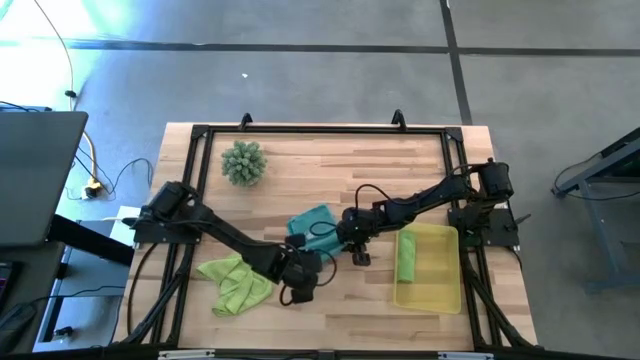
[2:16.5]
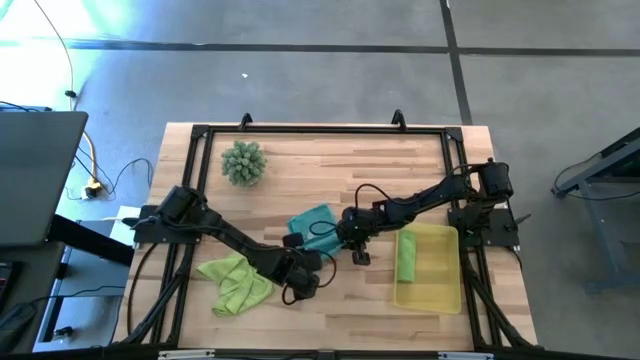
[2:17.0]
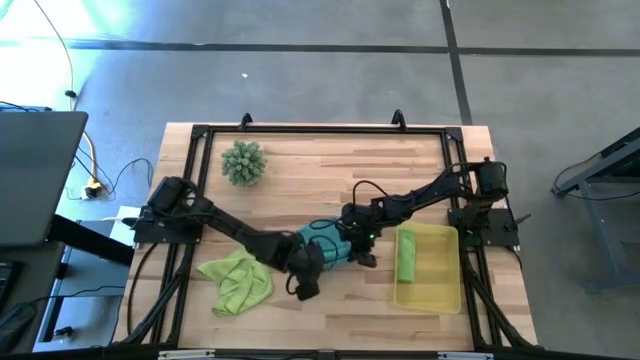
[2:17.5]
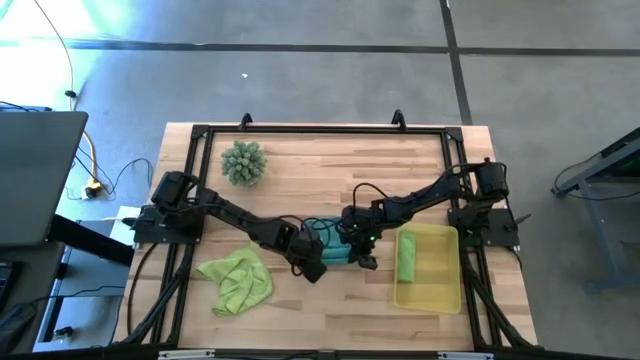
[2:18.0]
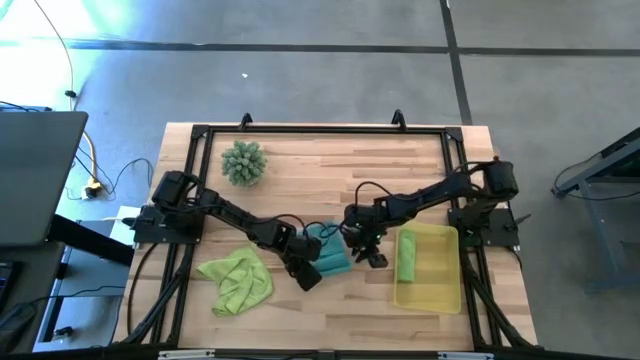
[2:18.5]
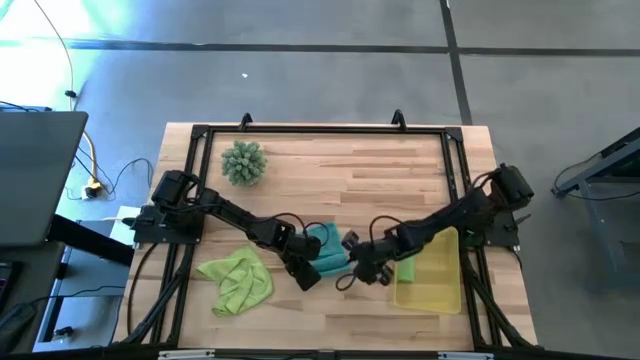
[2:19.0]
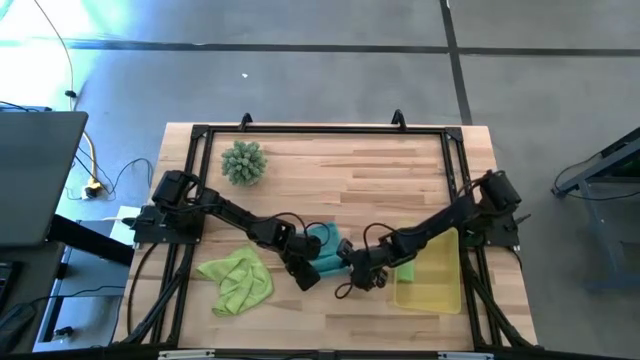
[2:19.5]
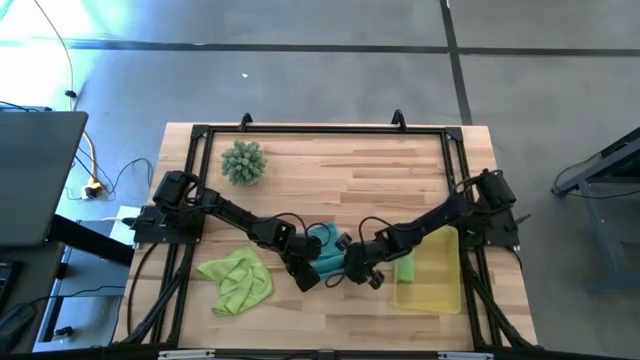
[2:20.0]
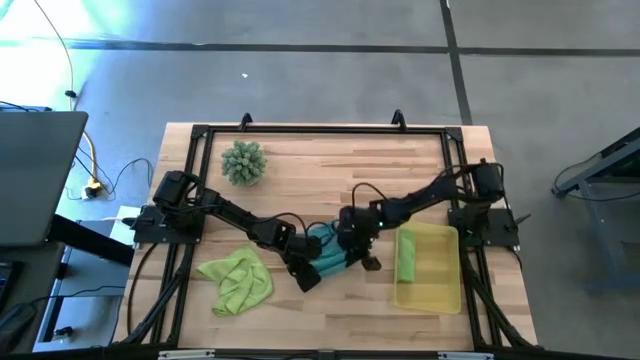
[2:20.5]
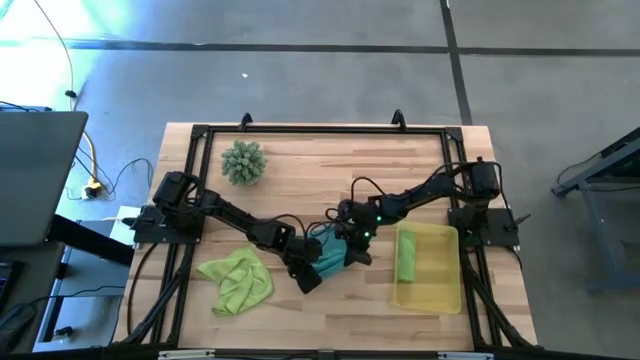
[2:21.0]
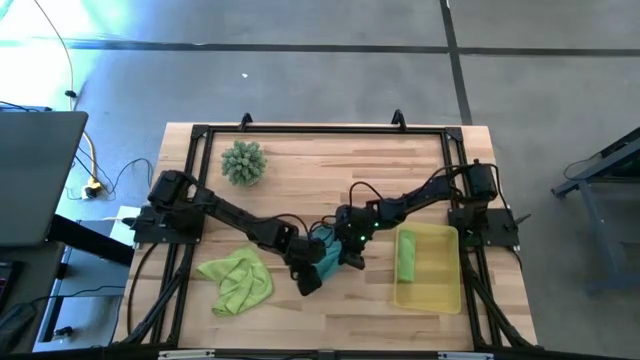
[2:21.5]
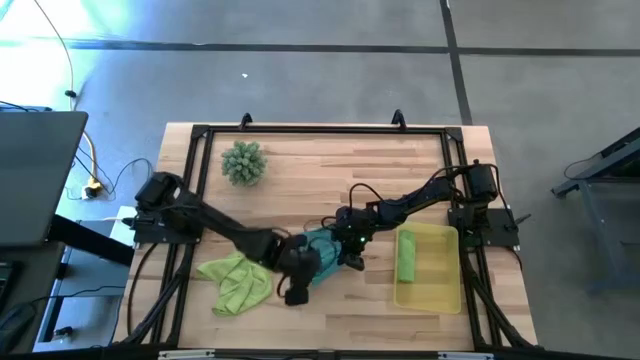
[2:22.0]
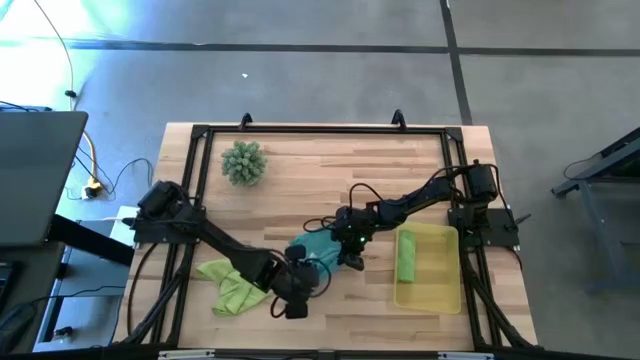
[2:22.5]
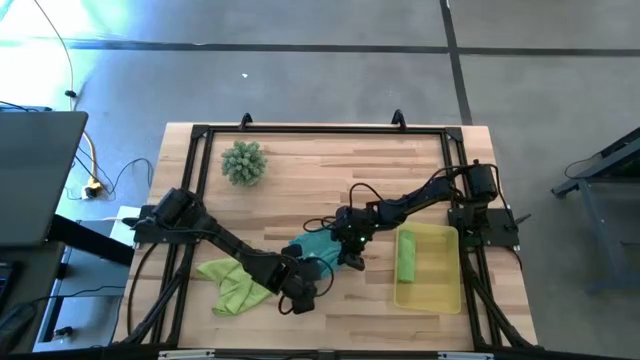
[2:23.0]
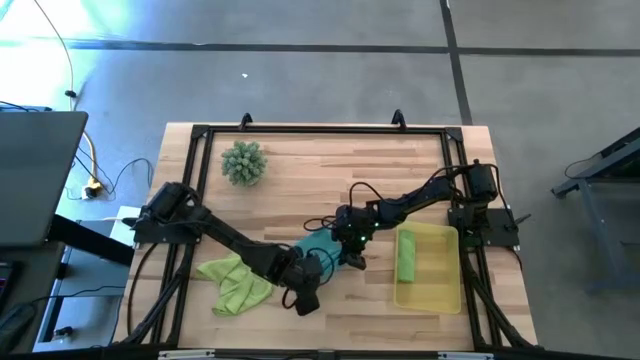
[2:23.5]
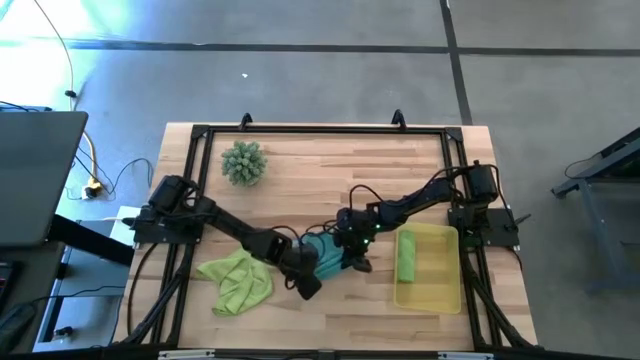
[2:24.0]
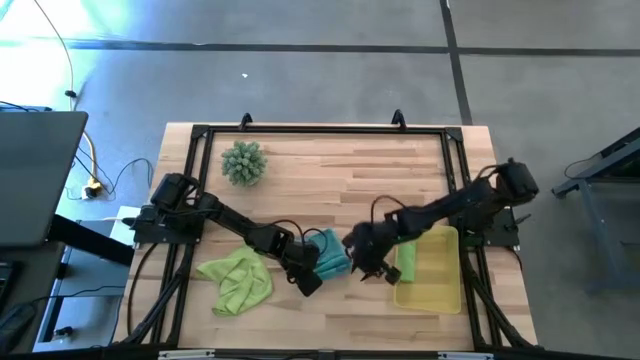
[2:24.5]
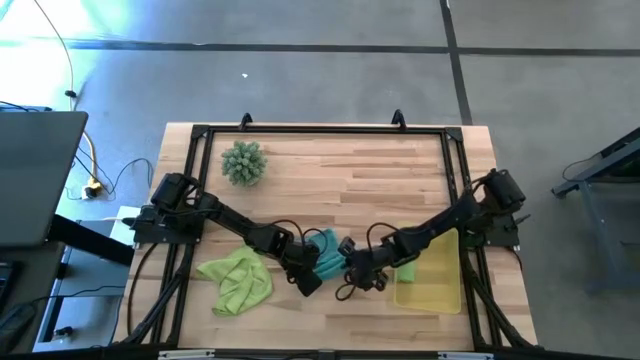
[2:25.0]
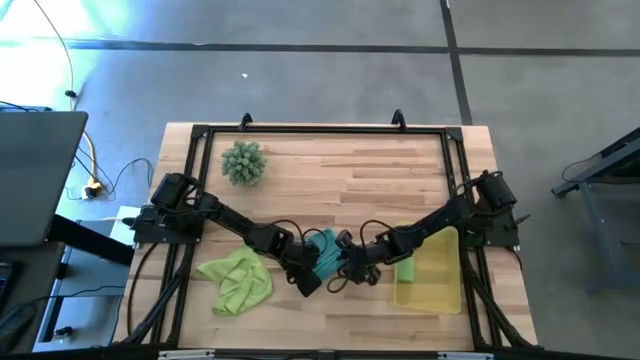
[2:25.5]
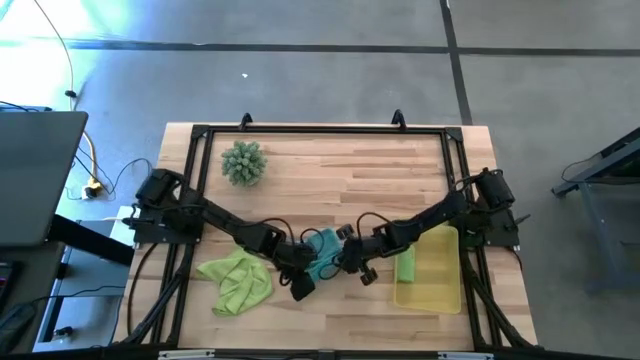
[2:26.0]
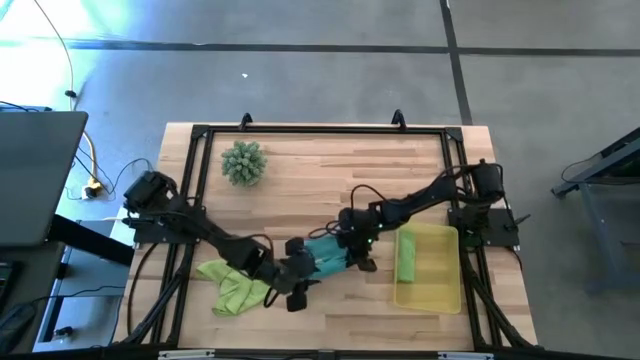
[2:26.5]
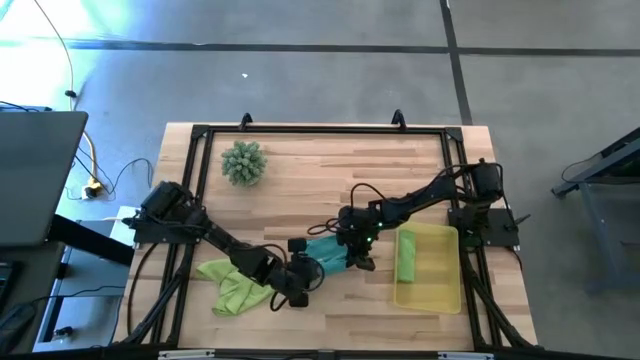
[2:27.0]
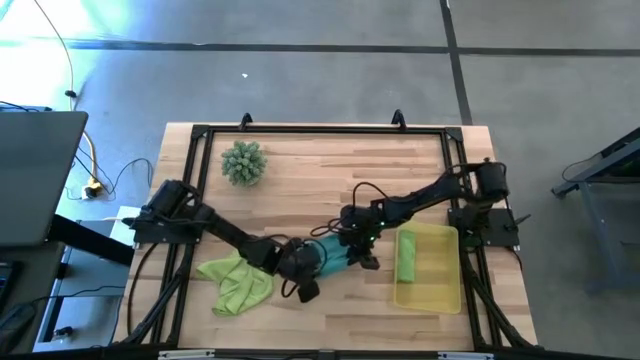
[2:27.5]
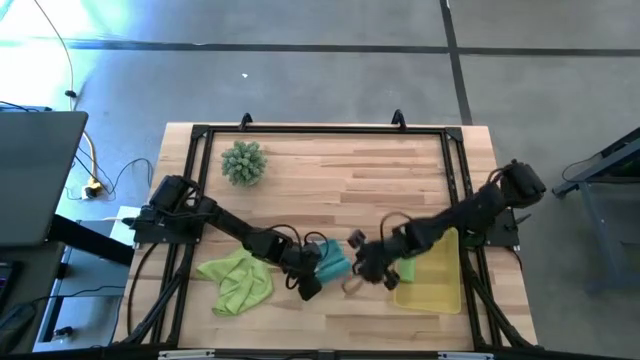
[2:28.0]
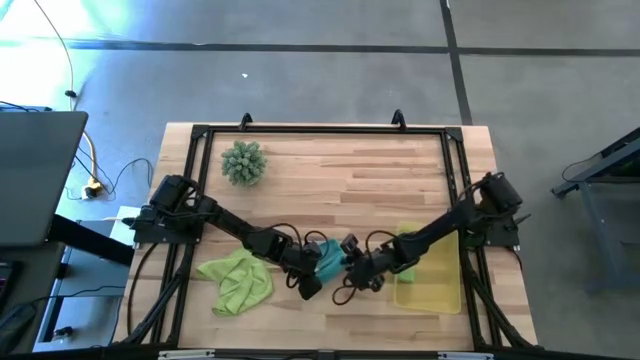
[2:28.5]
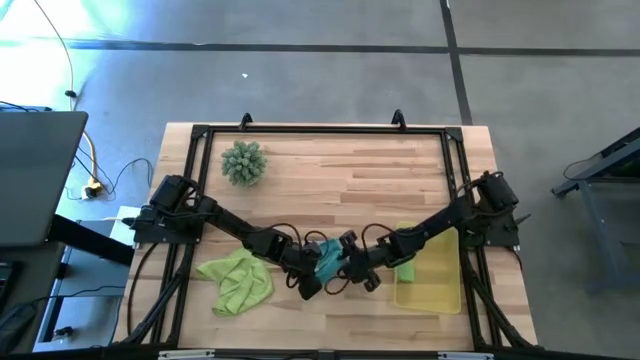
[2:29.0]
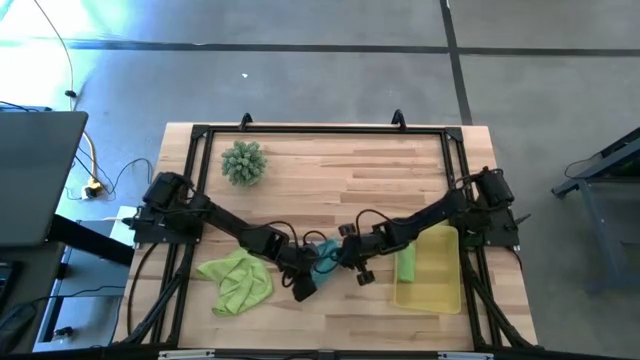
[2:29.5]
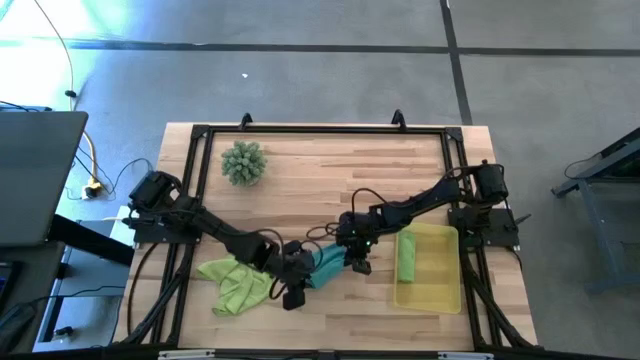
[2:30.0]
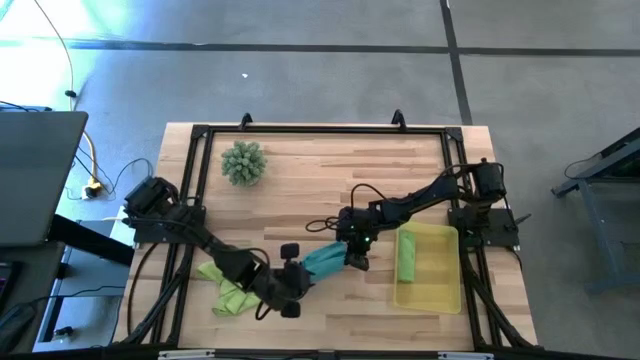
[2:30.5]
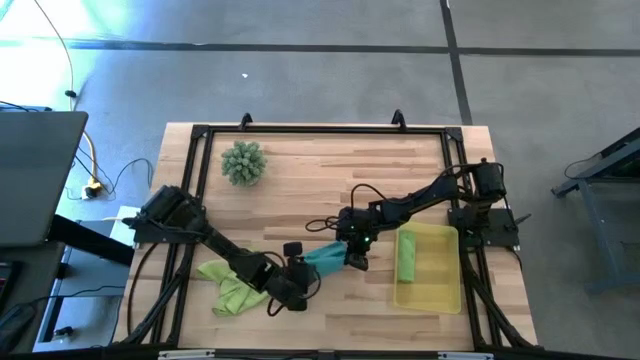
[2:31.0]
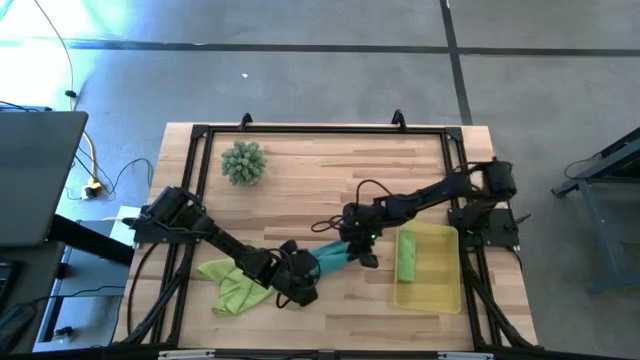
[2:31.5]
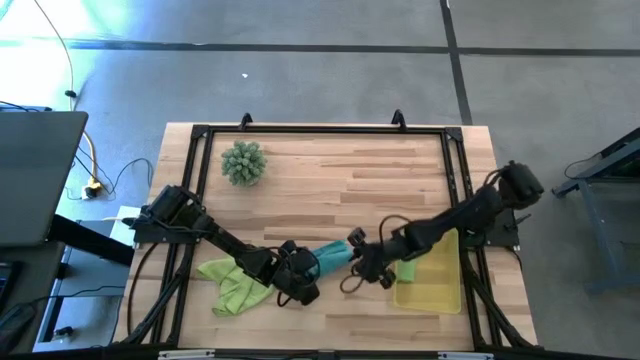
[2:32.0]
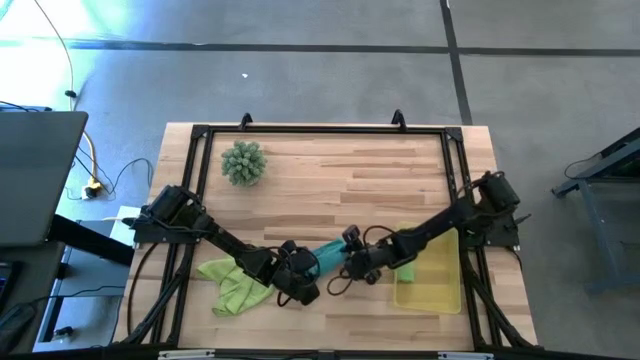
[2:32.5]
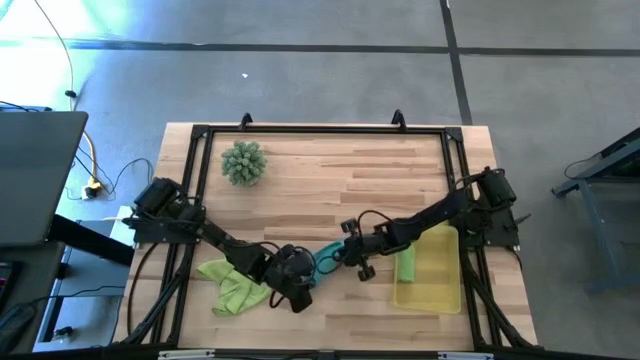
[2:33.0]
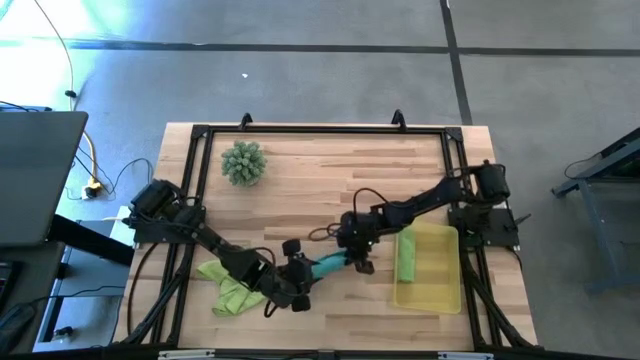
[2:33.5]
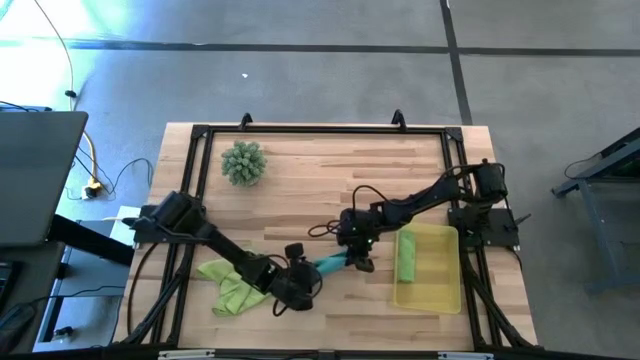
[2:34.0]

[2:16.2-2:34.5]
Task: Roll microfiber towels into tight, uniform cylinder then place into a basket
Roll the blue cloth

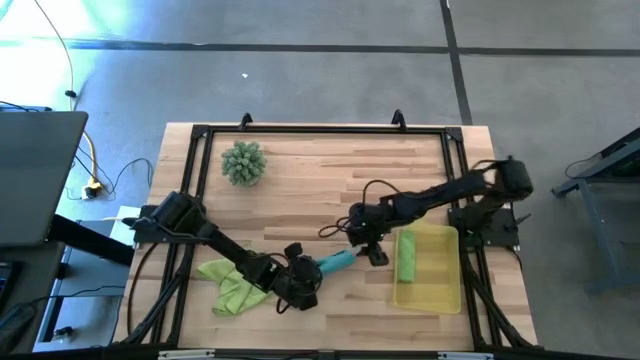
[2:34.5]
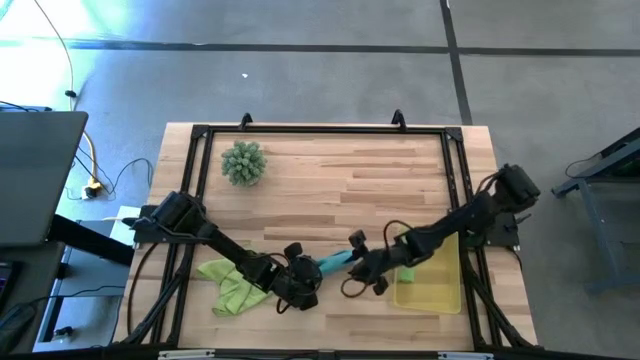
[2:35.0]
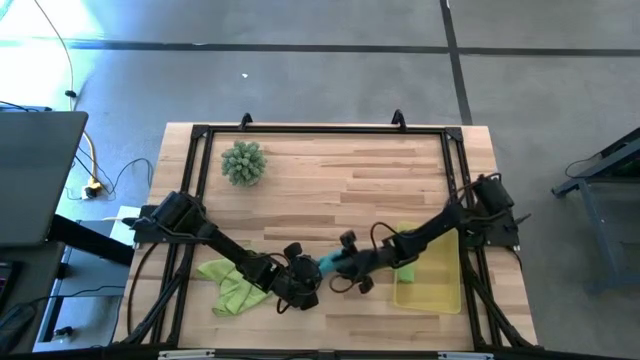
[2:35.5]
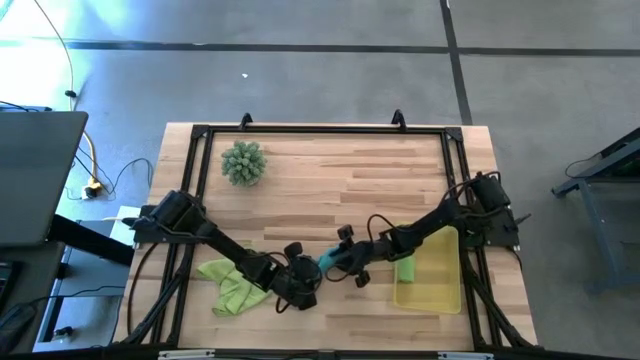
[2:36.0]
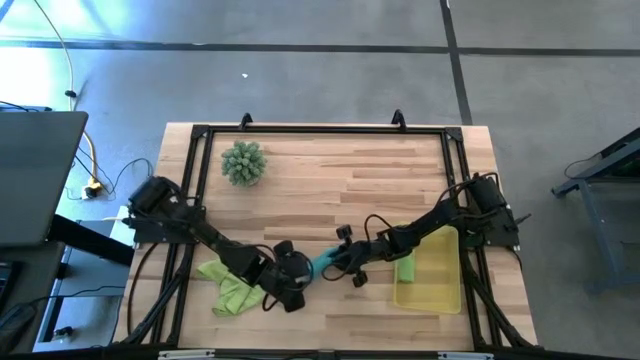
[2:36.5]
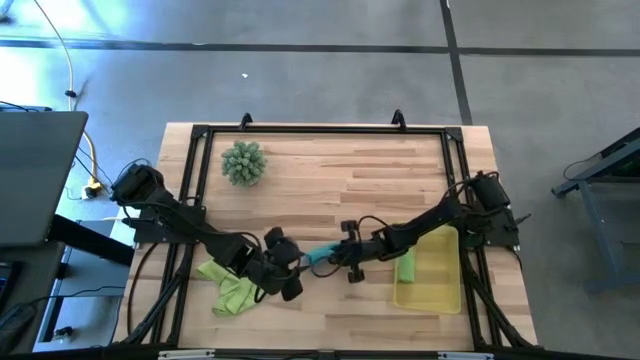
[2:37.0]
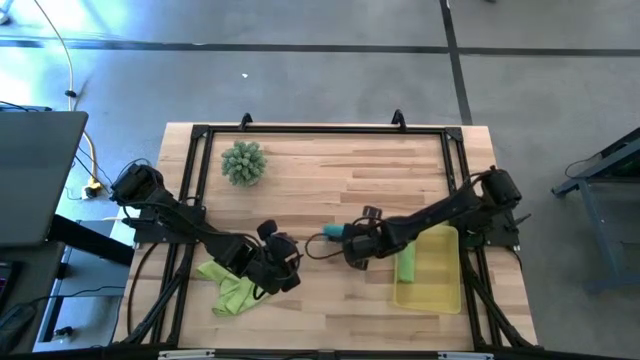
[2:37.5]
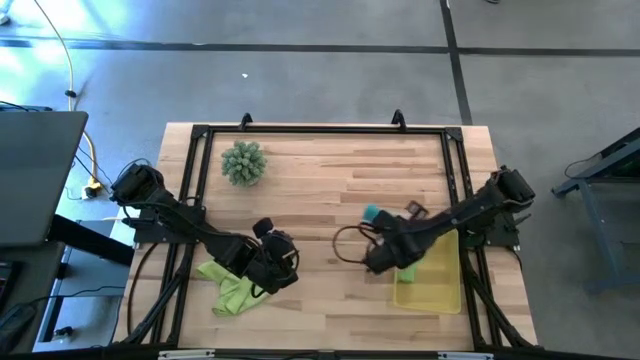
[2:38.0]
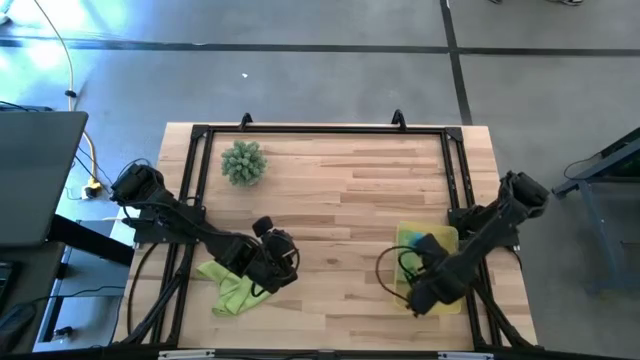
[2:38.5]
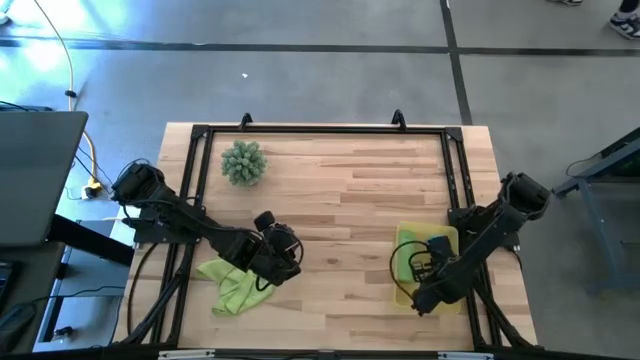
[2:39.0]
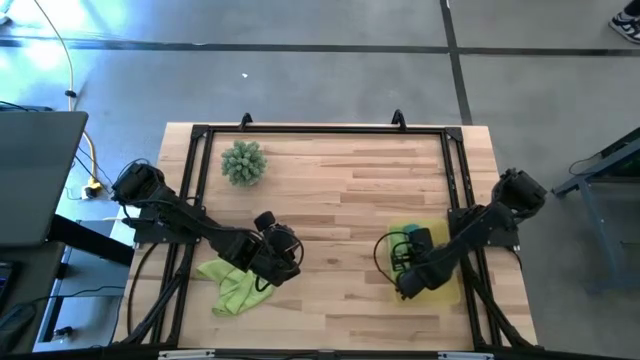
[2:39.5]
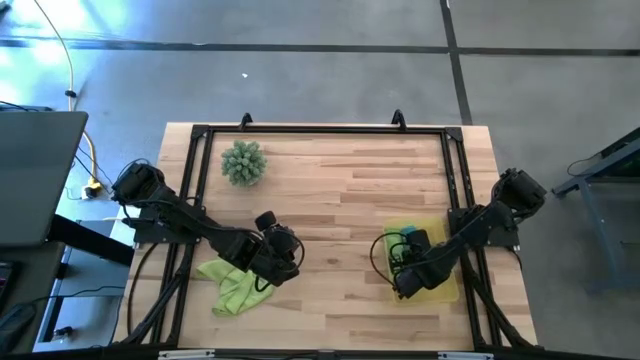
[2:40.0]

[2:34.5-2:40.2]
Put the blue cloth into the bin
